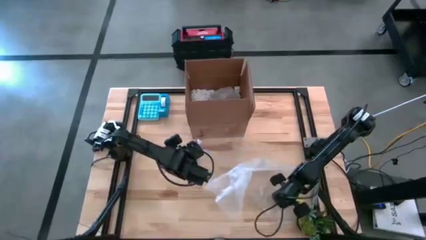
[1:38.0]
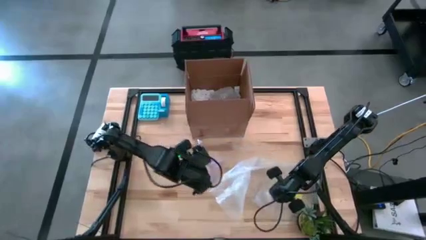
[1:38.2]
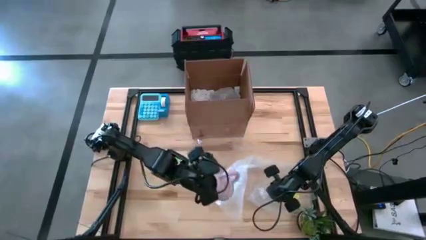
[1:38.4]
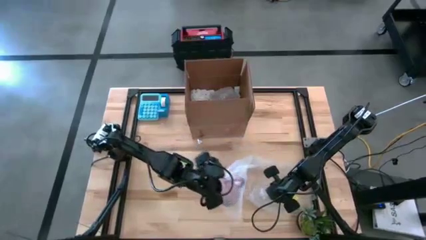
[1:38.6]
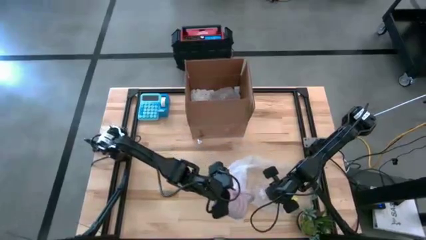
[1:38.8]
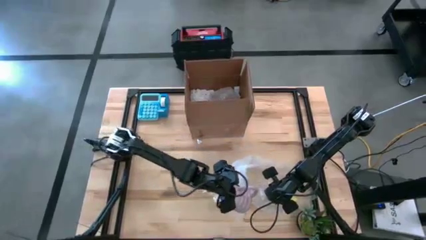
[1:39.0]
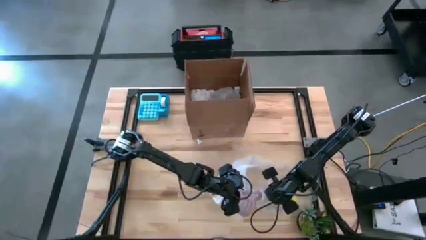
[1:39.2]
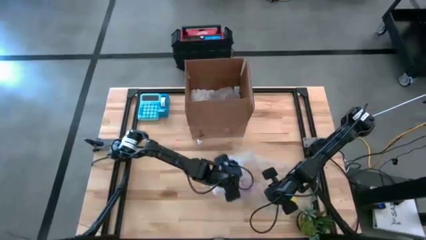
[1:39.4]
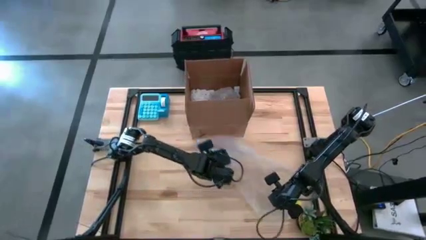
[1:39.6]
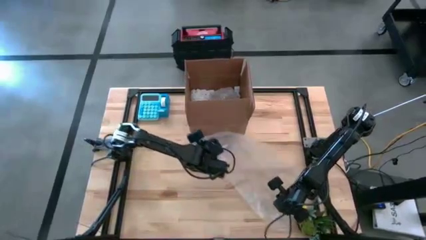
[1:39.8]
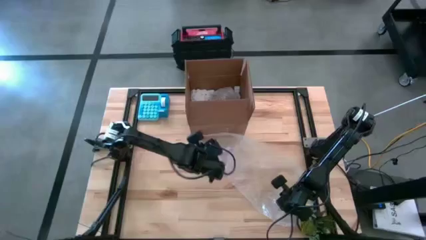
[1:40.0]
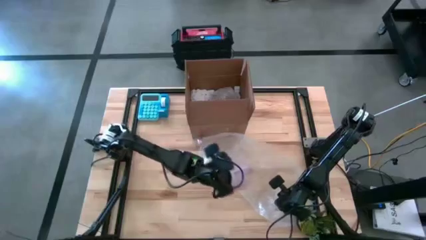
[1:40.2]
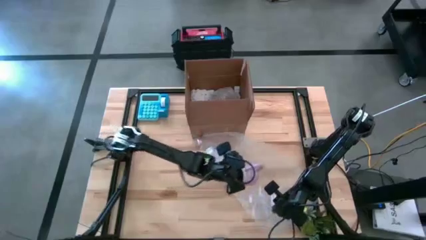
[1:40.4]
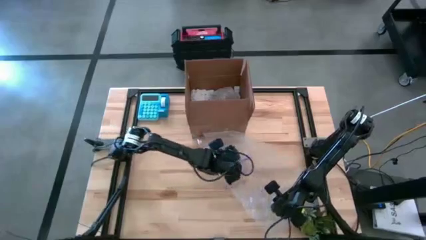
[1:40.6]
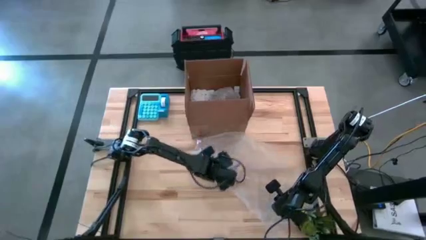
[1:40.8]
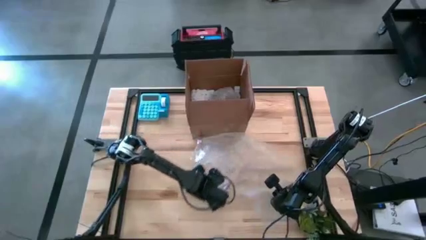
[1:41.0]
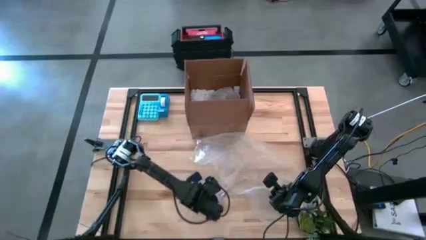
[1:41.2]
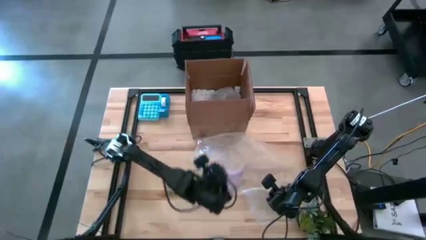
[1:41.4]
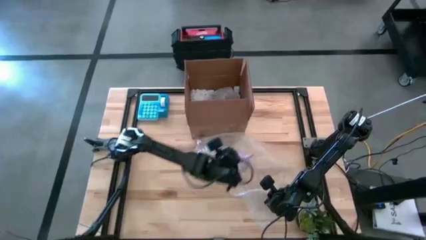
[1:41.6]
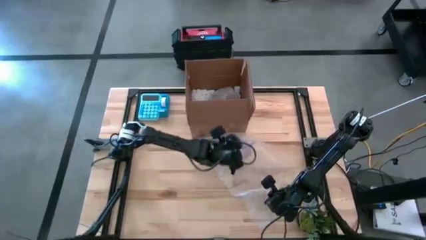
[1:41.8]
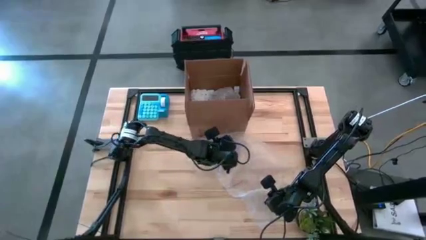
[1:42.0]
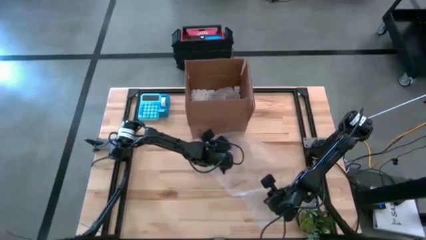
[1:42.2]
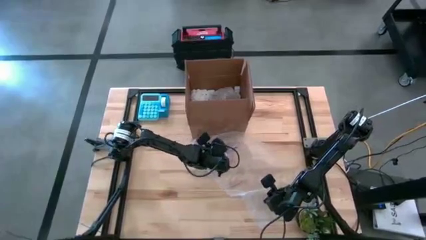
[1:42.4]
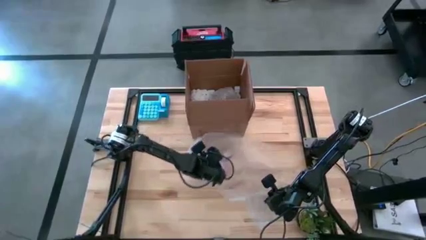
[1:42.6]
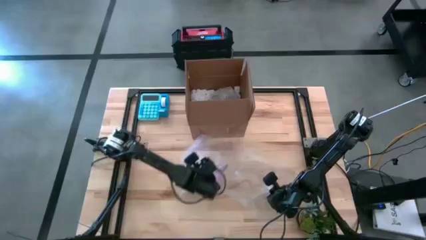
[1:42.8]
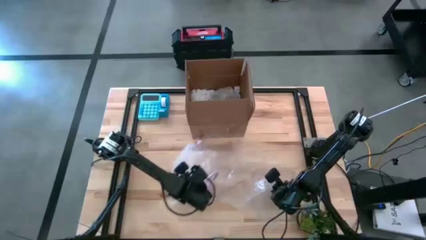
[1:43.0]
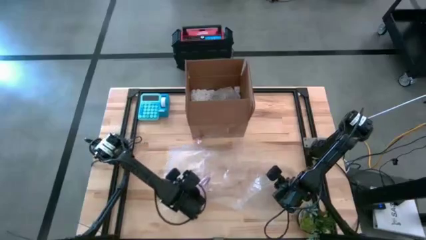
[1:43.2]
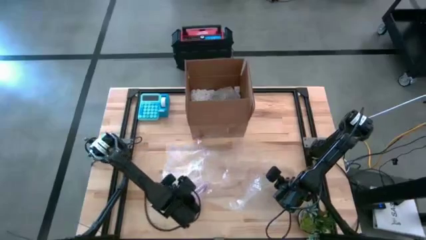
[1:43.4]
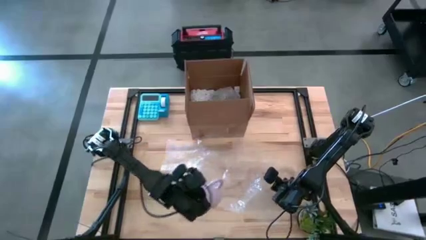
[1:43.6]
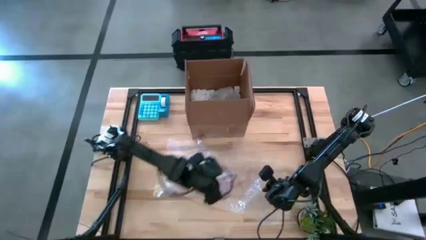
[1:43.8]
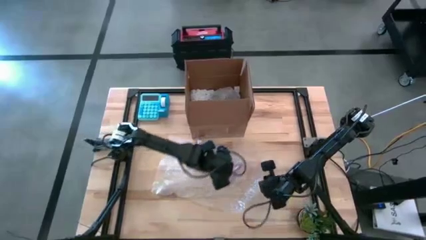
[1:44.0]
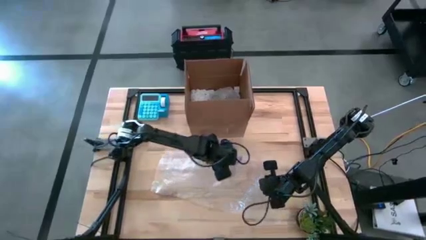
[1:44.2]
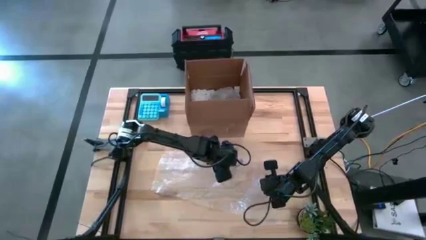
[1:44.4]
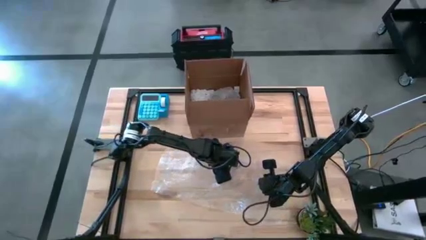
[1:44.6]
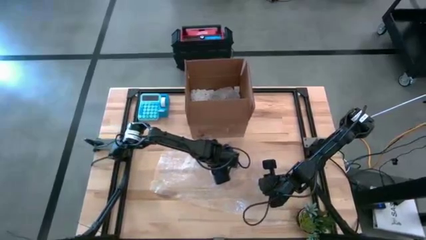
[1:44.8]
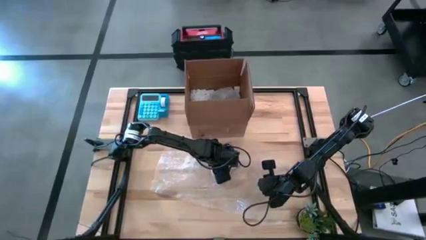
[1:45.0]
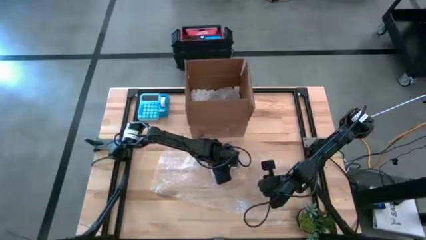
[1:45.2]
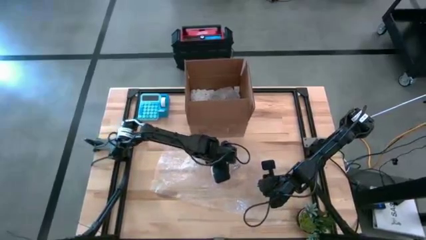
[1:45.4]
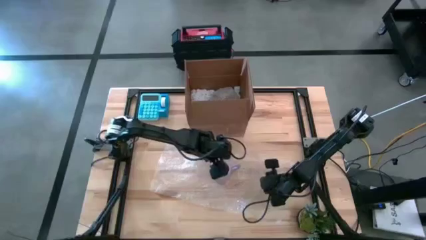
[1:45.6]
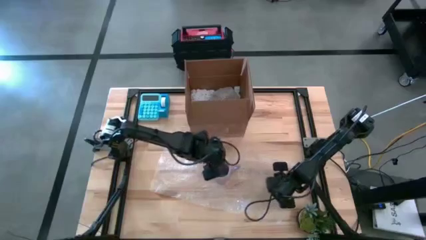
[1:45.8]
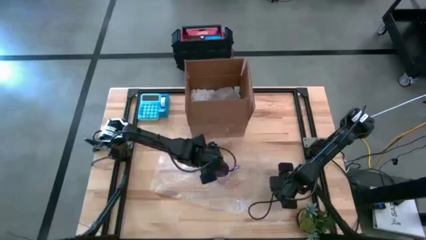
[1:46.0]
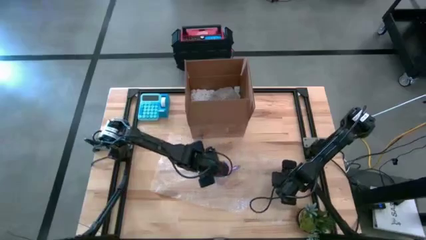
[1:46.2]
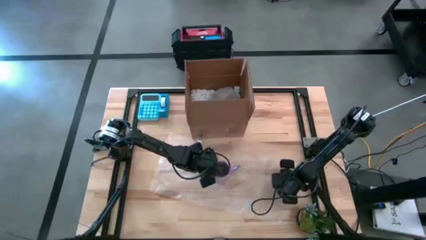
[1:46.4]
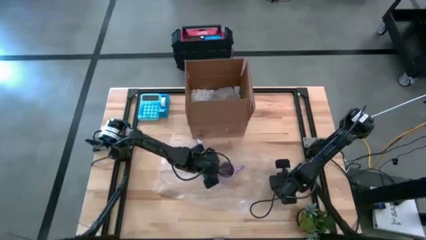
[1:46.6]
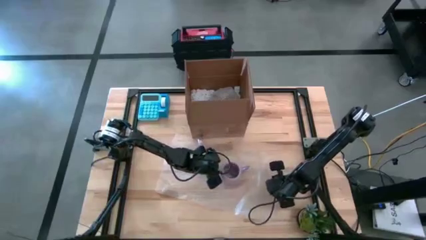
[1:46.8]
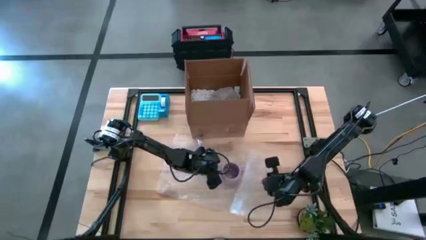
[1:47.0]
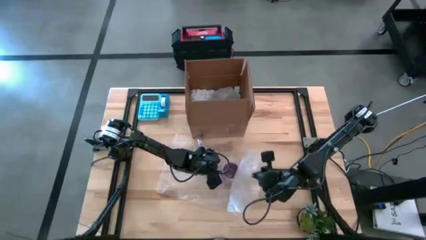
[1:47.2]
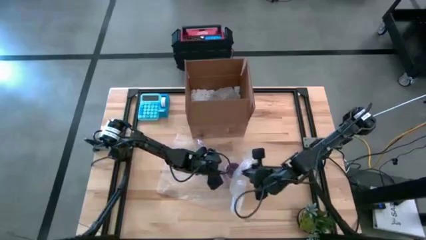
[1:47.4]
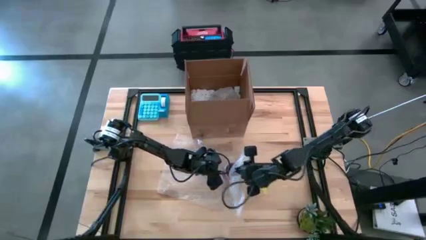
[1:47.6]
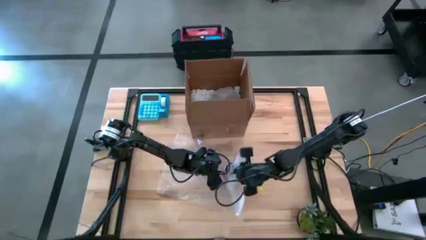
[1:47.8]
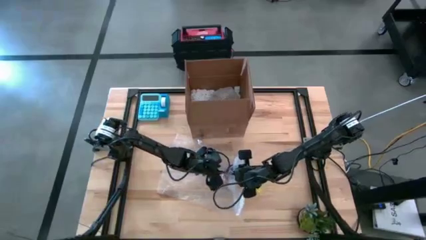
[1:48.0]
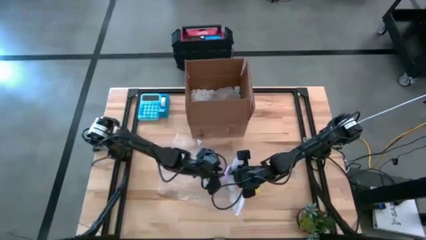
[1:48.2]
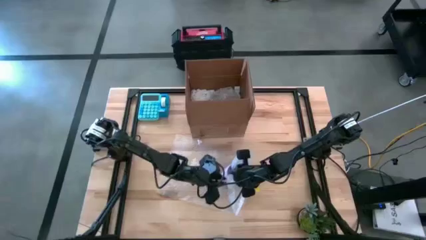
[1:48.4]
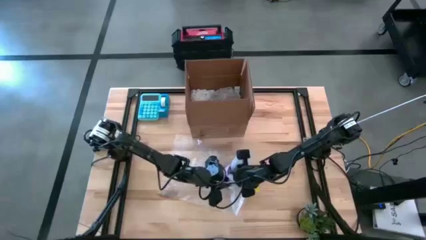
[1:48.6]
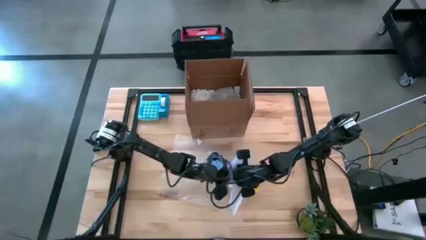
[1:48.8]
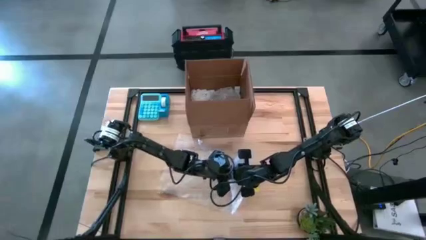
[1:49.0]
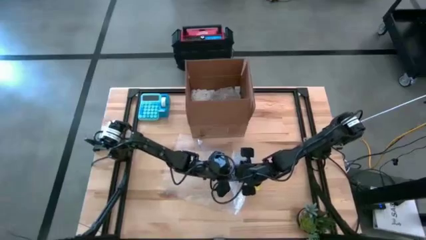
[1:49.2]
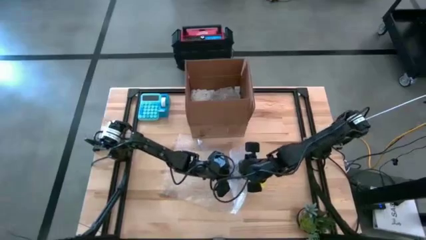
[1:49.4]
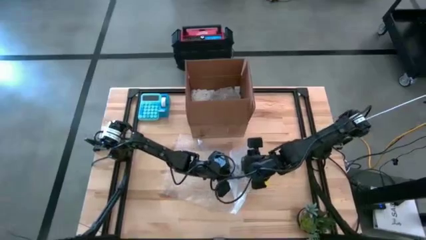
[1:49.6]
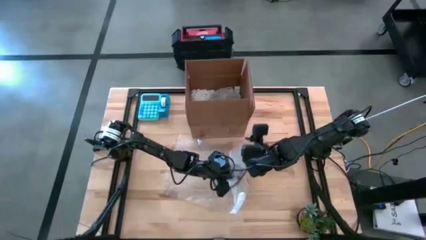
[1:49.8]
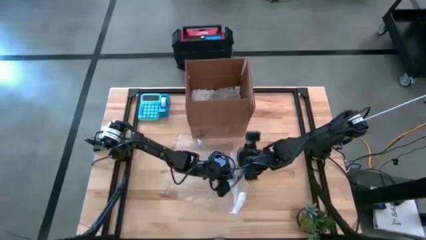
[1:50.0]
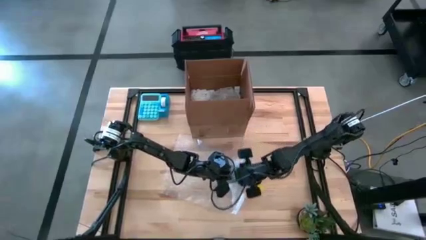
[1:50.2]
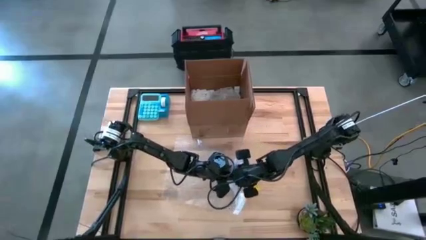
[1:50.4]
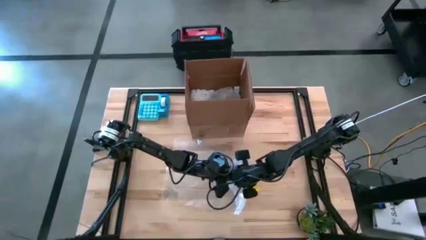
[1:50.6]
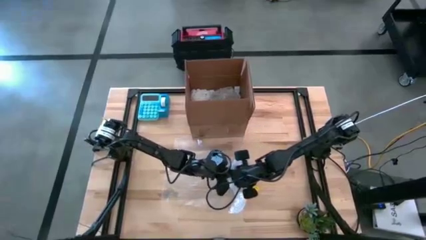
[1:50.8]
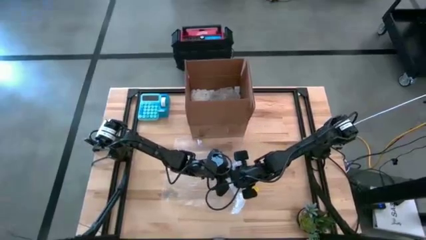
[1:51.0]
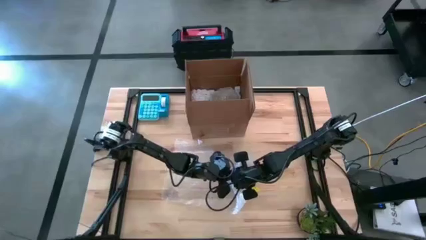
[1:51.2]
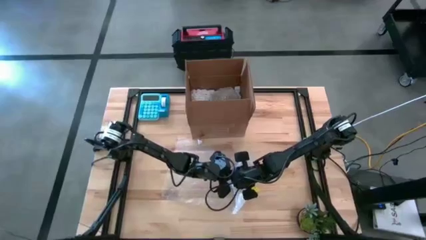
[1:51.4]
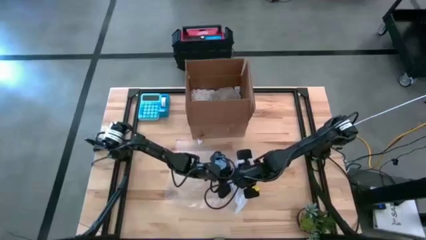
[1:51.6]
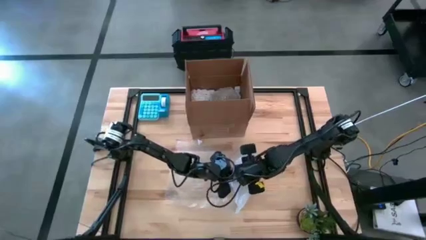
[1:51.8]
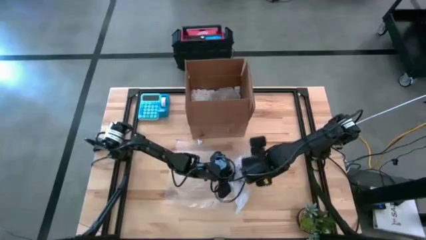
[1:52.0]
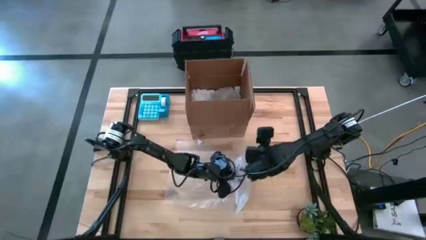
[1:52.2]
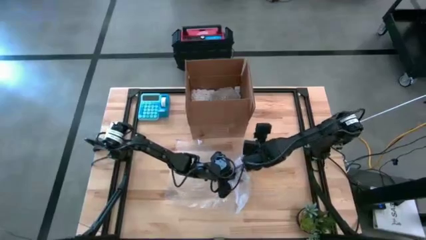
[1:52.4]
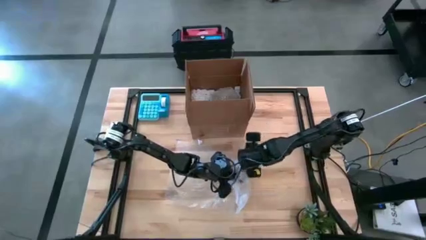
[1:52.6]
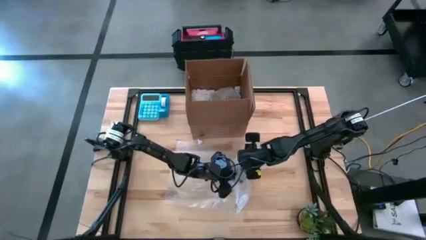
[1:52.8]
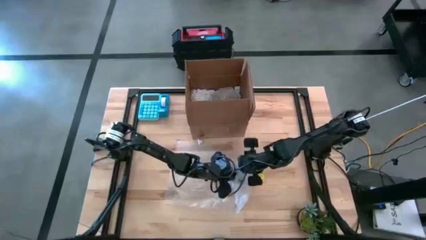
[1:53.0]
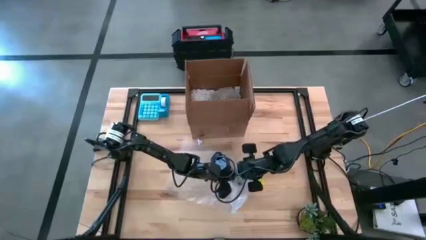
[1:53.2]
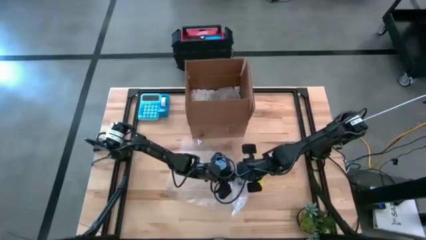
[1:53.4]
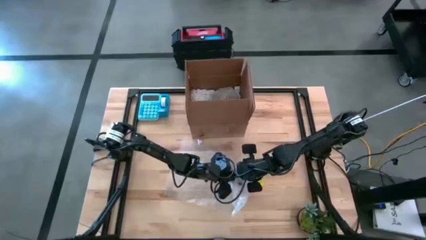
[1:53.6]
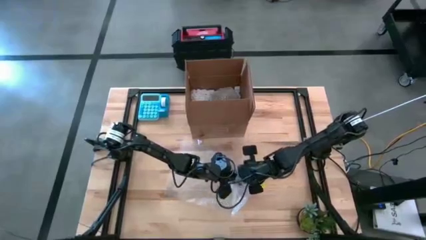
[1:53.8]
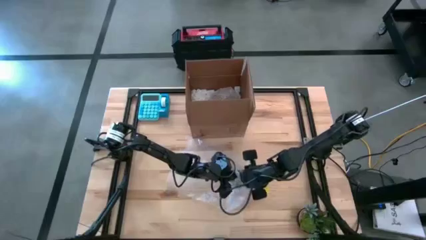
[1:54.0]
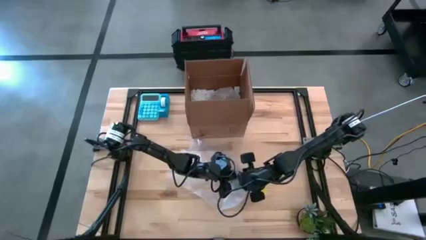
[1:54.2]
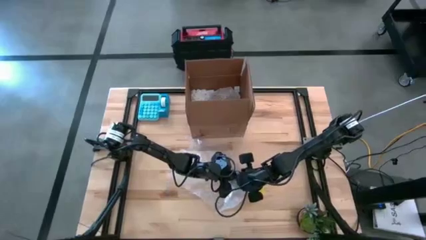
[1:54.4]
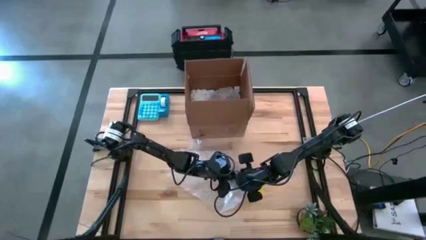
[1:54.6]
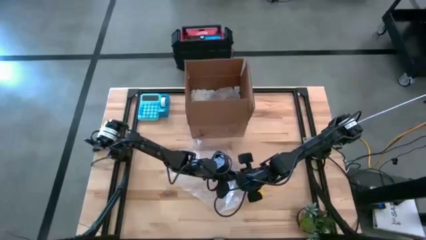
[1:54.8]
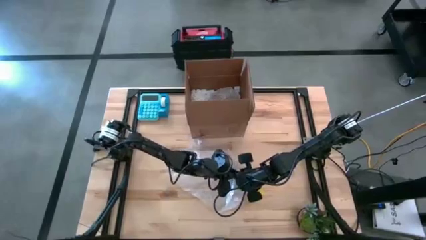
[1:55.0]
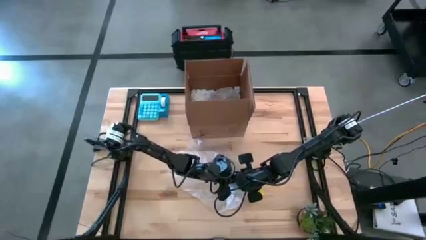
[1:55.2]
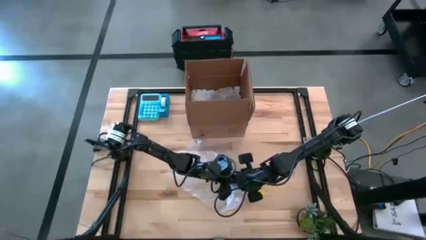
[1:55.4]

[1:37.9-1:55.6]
Task: wrap mug
Wrap the purple mug with bubble wrap
